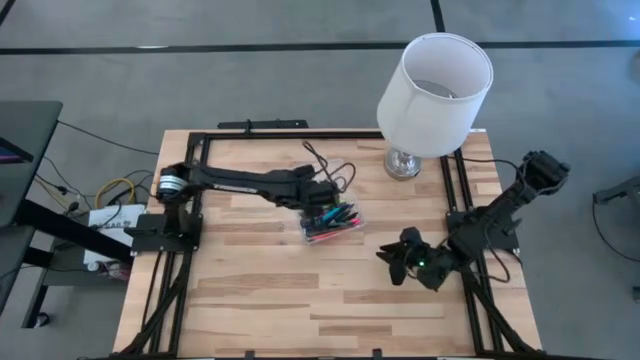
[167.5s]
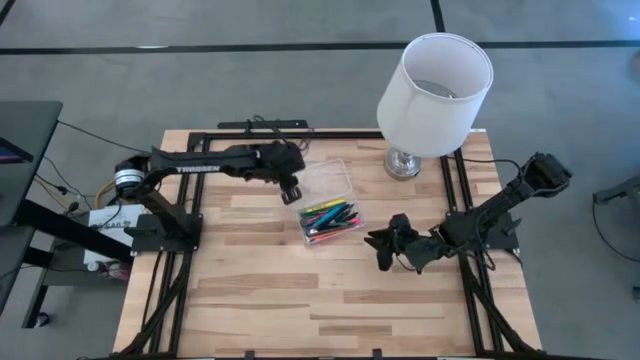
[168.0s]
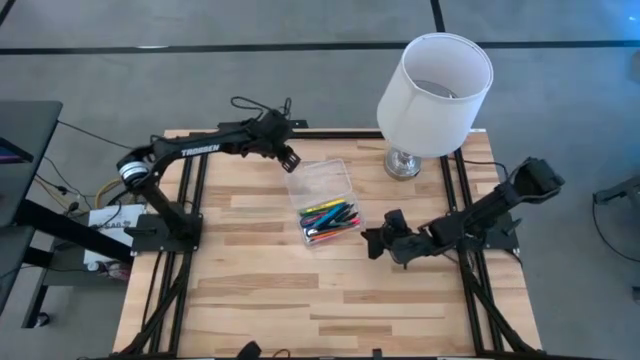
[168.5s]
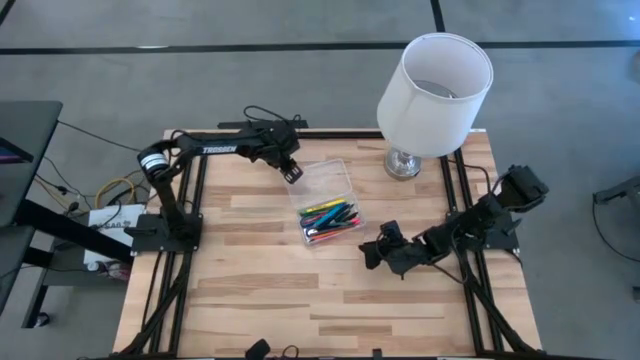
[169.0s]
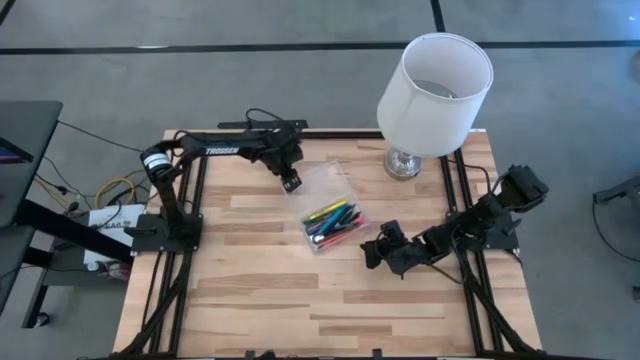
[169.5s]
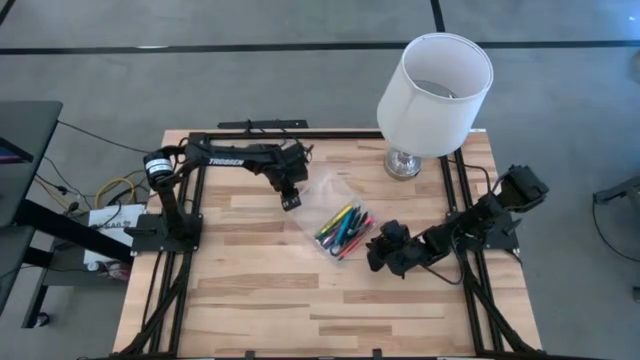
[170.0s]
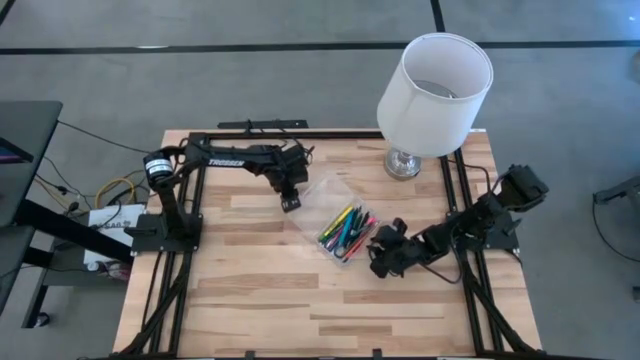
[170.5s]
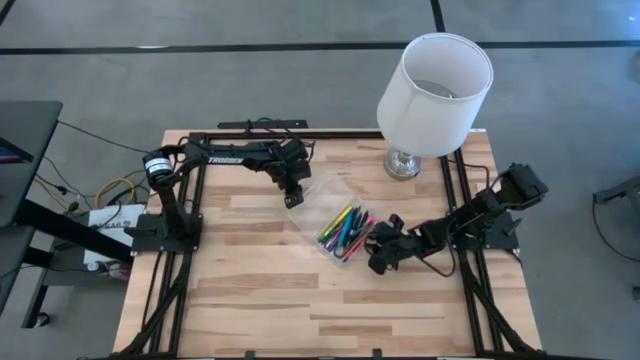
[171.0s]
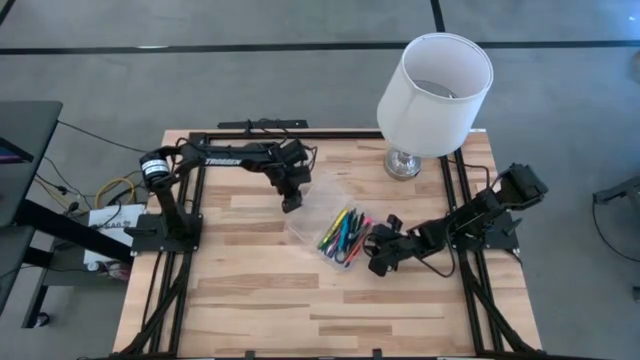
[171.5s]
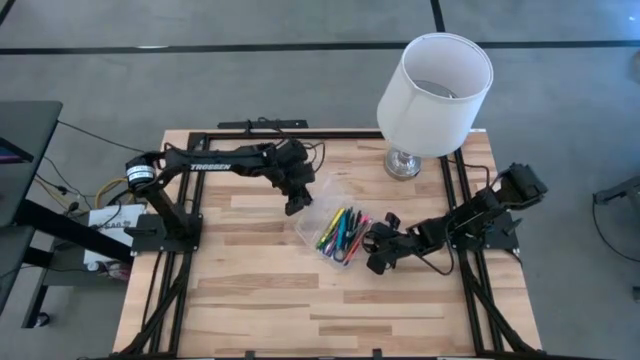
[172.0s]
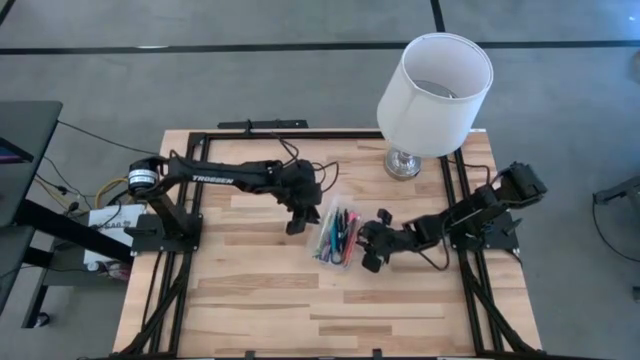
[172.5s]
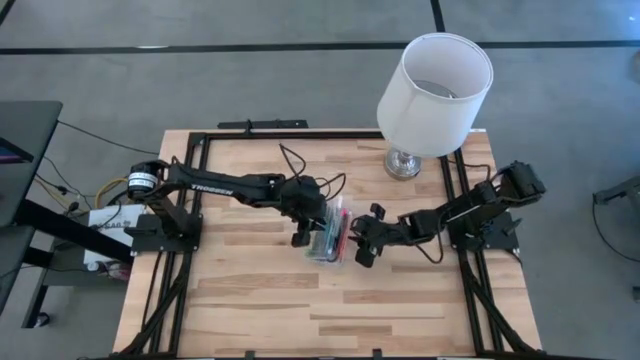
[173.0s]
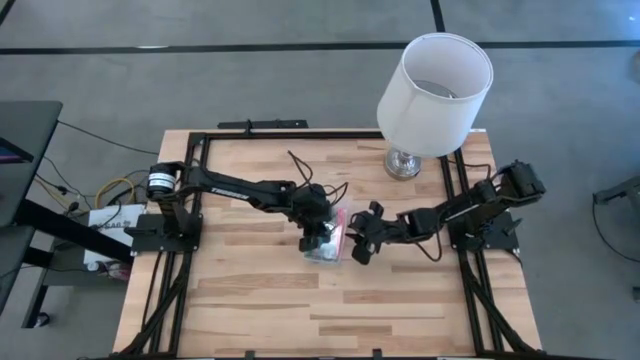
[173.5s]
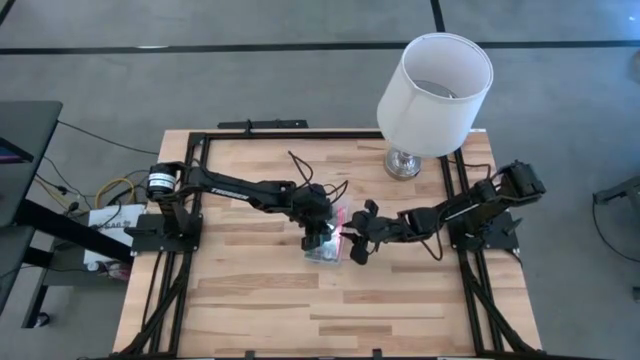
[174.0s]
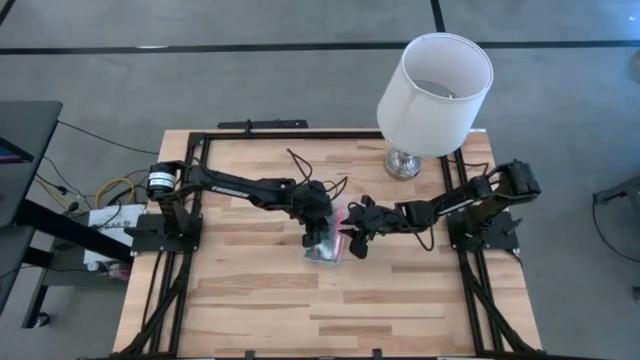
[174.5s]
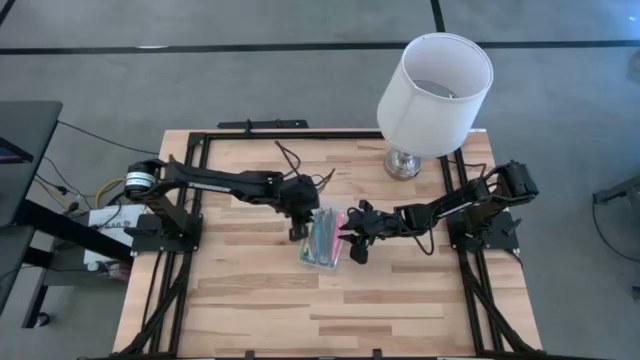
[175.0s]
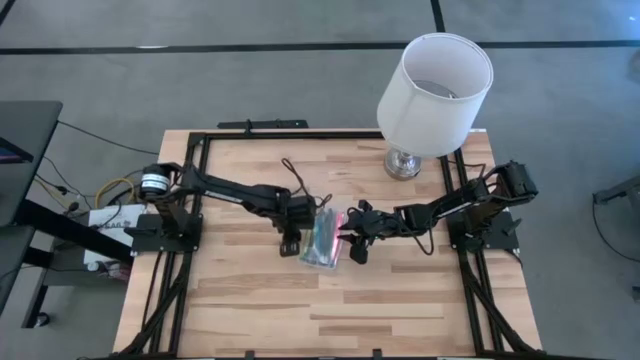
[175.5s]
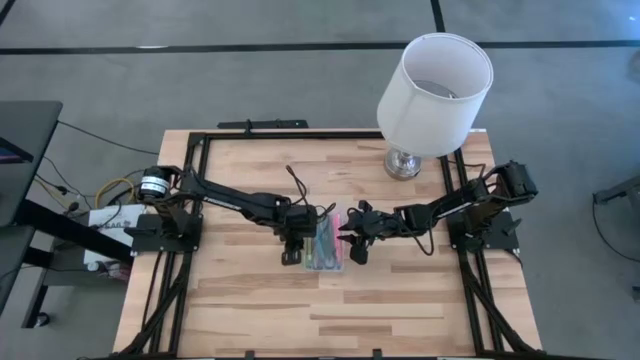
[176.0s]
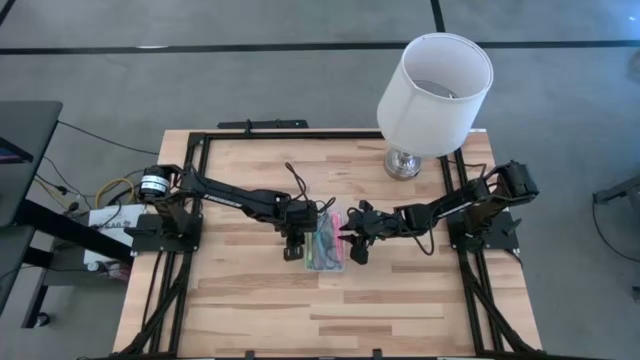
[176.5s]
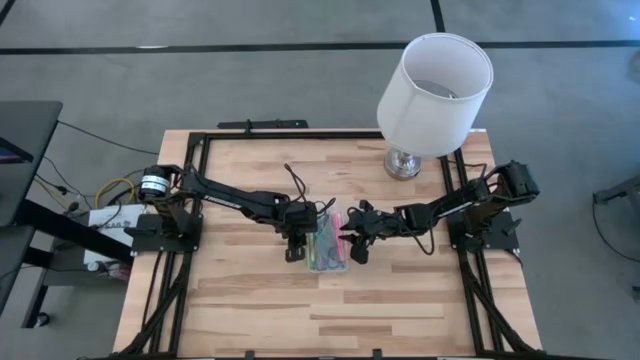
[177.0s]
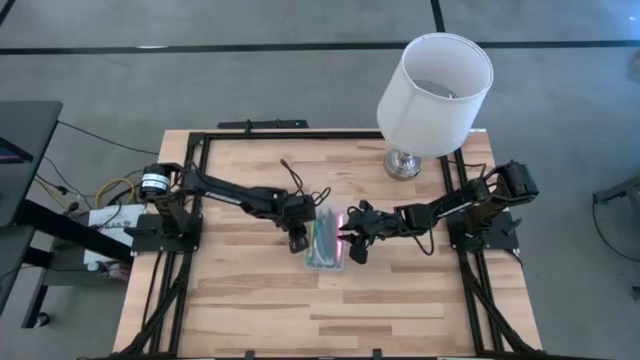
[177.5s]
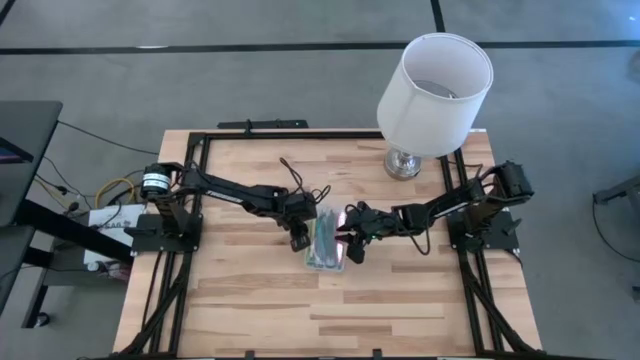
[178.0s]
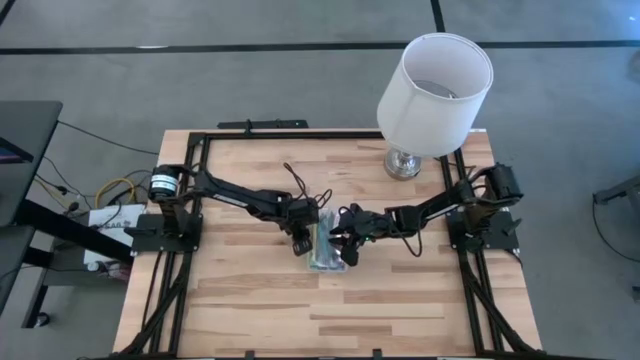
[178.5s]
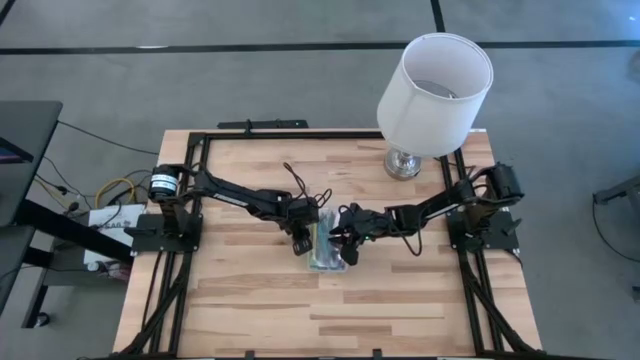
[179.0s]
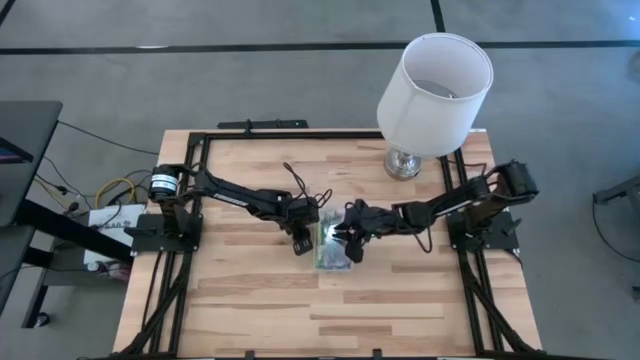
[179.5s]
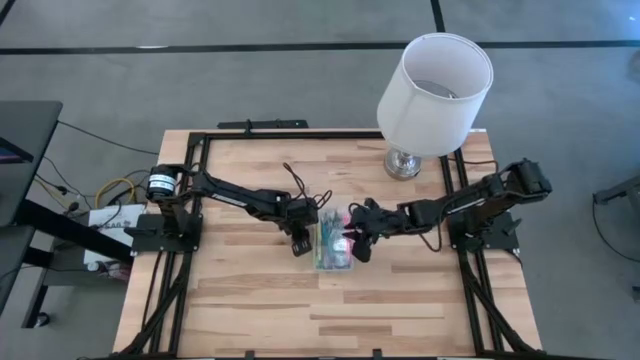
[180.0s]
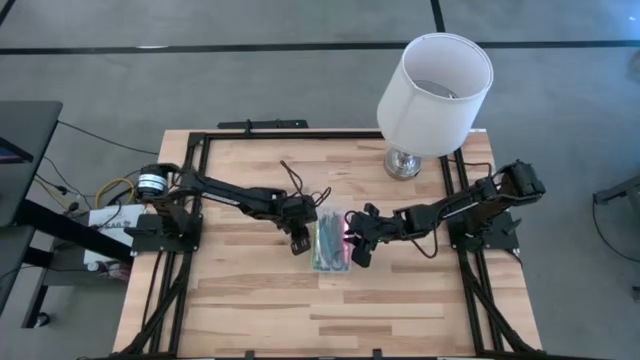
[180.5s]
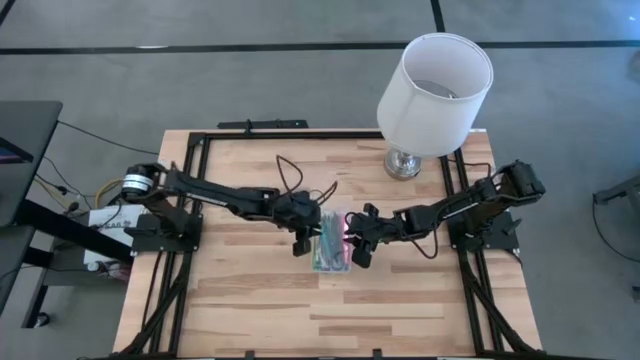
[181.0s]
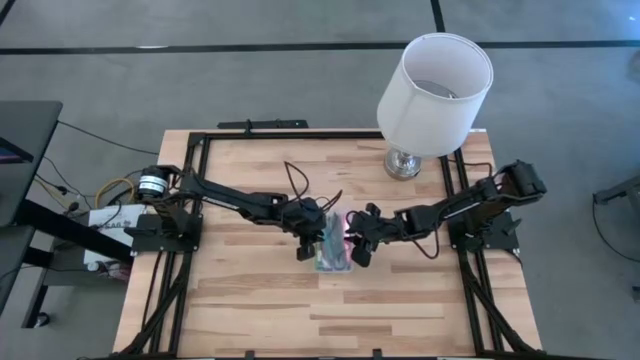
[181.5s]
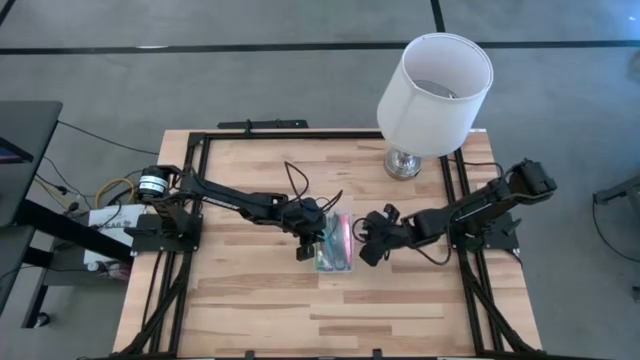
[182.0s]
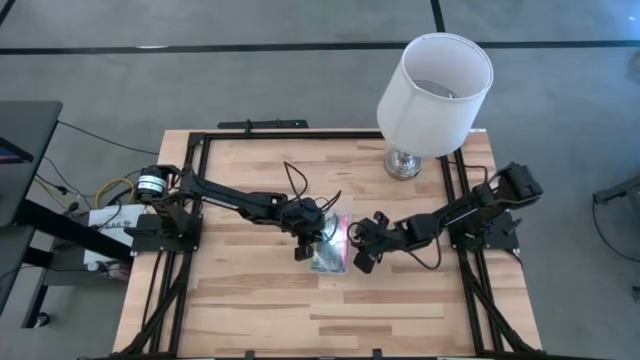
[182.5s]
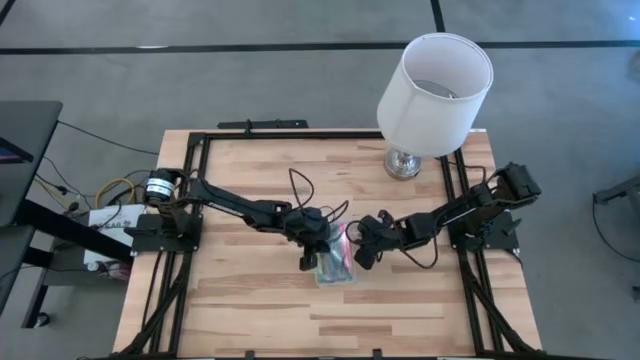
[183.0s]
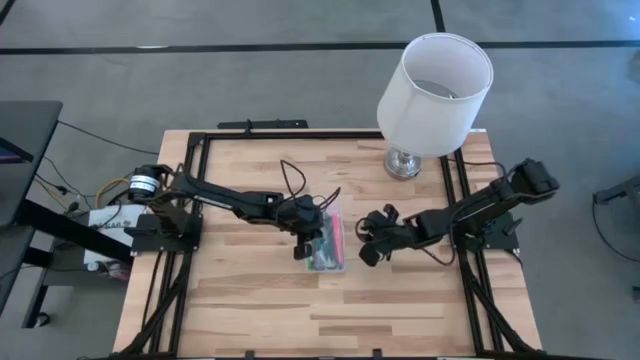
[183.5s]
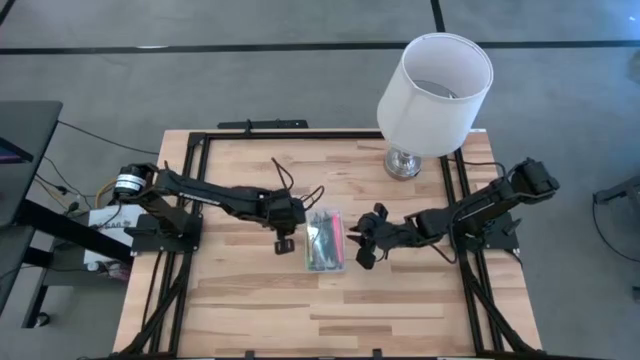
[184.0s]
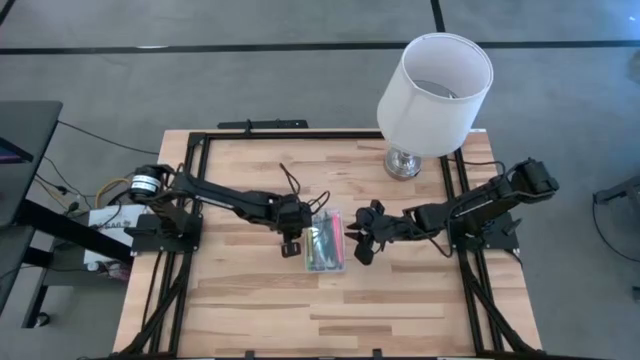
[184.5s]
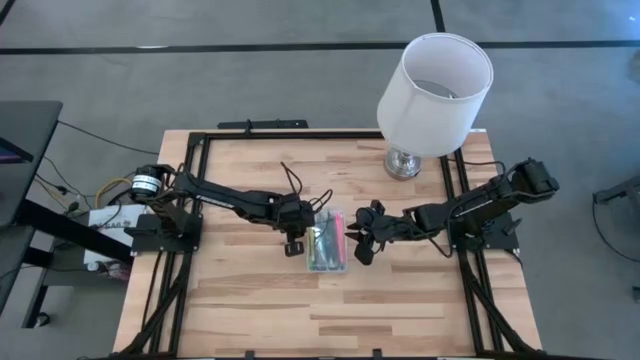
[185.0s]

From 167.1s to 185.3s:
Task: Pick & place school supplies into a supply box
Close the transparent supply box

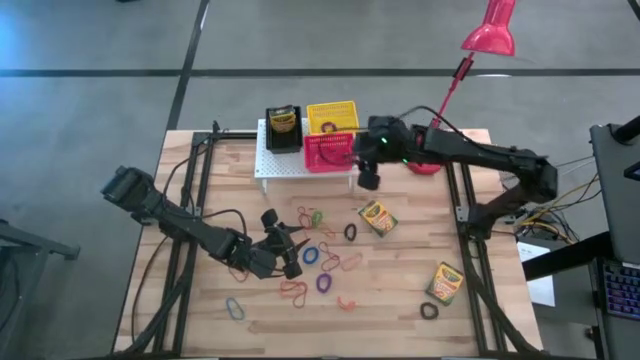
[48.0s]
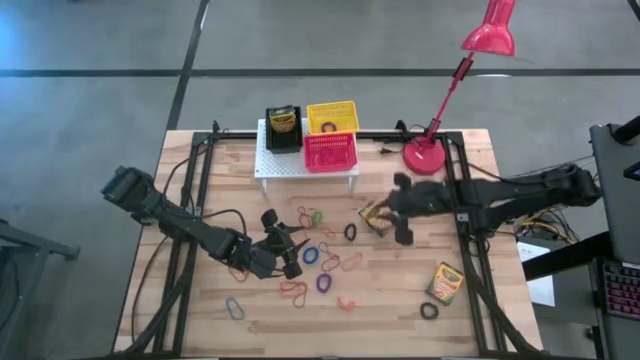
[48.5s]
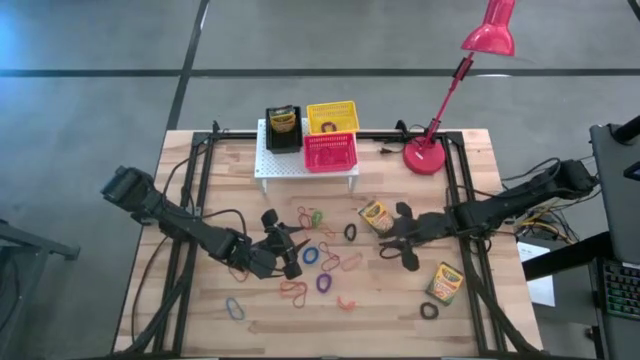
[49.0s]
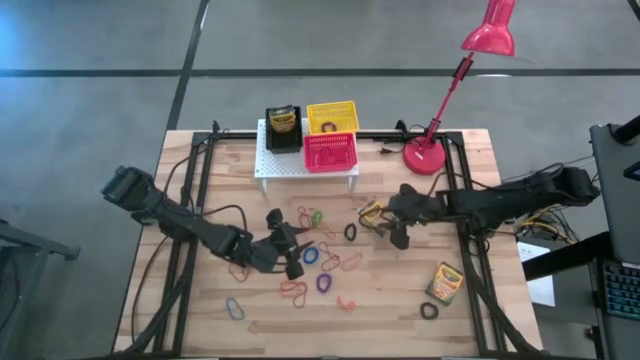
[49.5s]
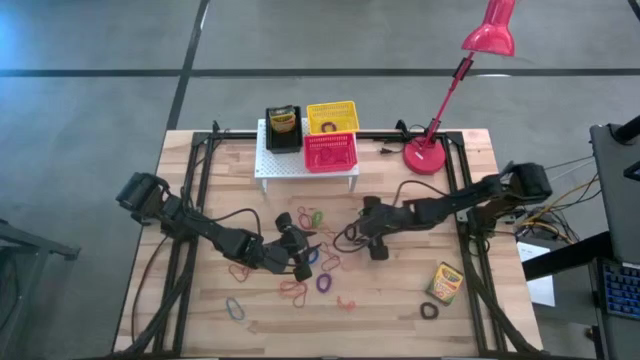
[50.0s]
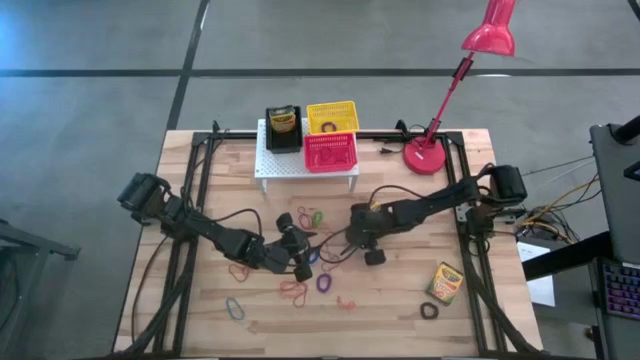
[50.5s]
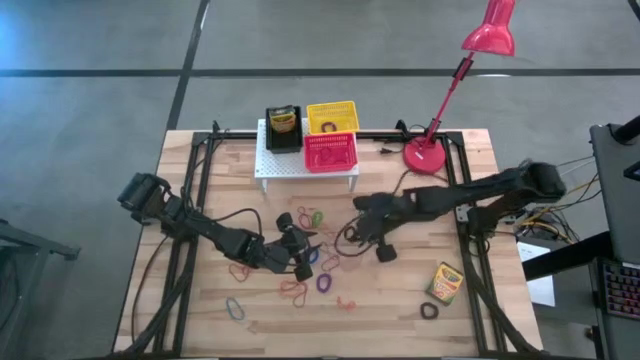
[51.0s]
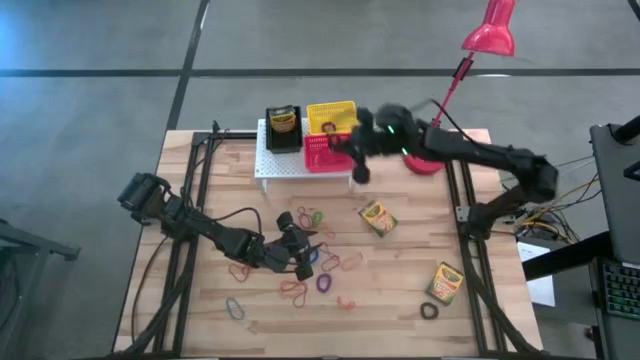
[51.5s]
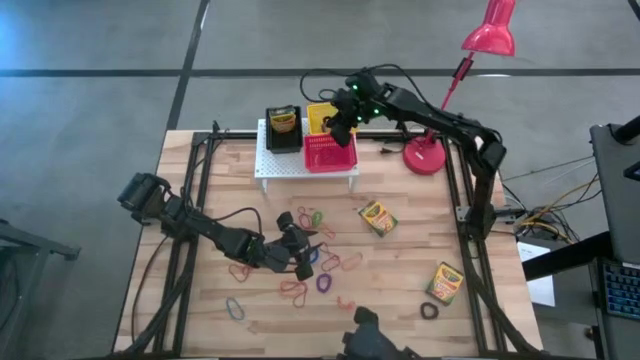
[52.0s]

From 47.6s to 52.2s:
Task: Pick & Place Office Desk Supplies
Put the black spring keychain into the yellow bin on the shelf
